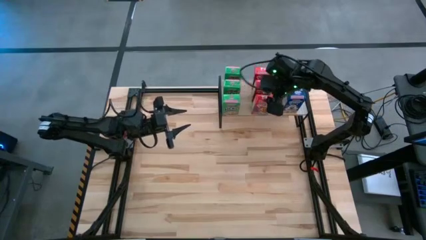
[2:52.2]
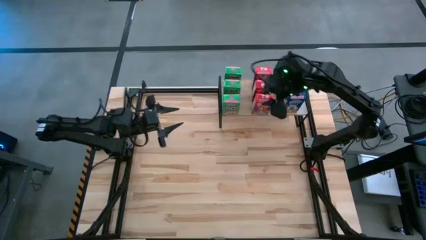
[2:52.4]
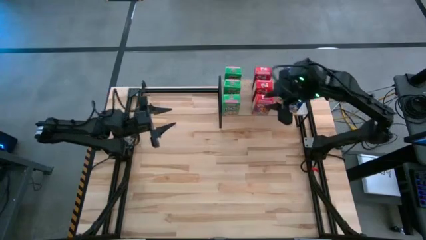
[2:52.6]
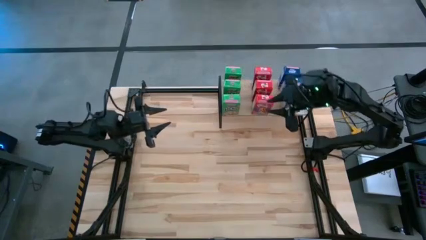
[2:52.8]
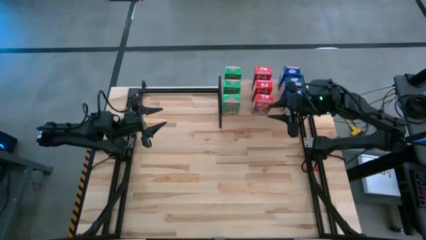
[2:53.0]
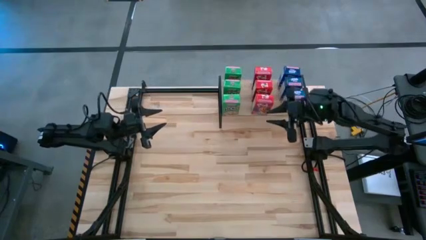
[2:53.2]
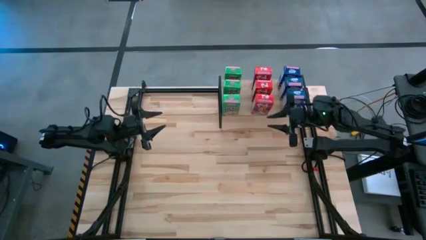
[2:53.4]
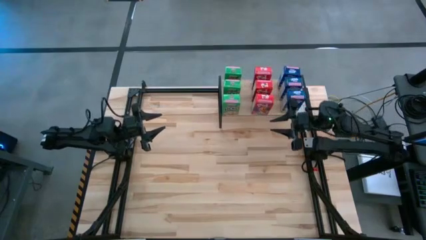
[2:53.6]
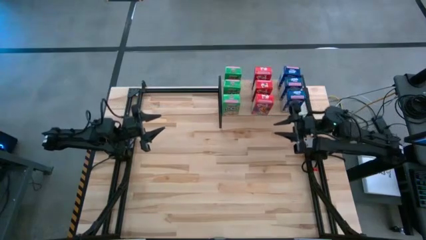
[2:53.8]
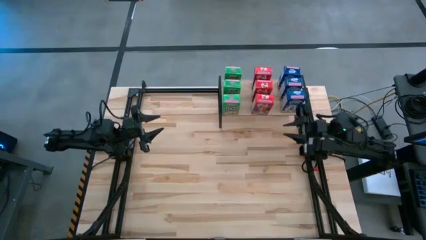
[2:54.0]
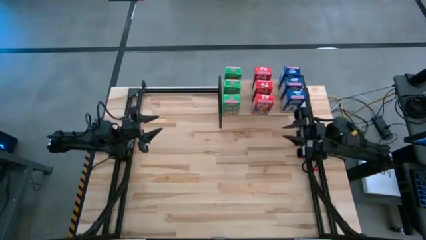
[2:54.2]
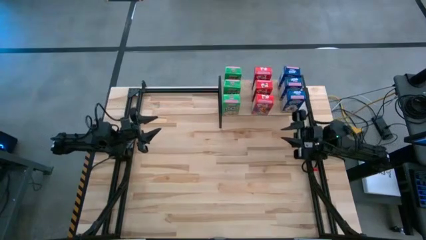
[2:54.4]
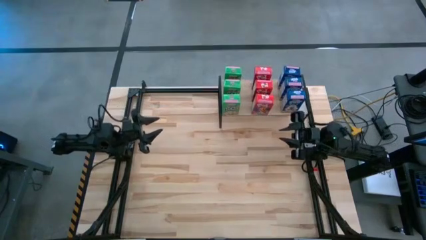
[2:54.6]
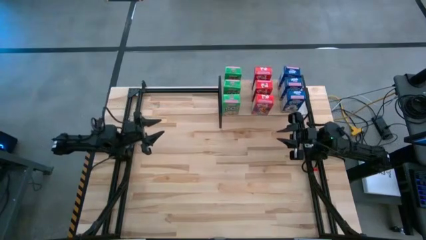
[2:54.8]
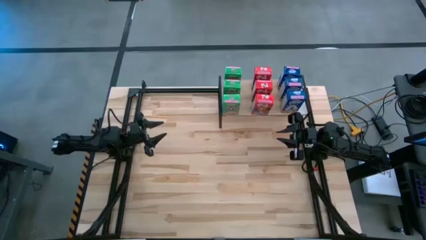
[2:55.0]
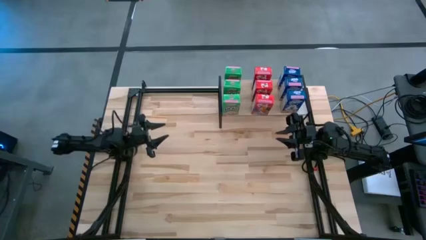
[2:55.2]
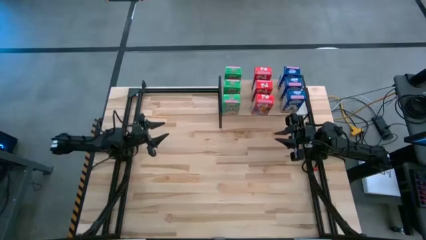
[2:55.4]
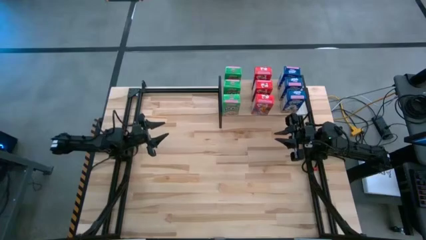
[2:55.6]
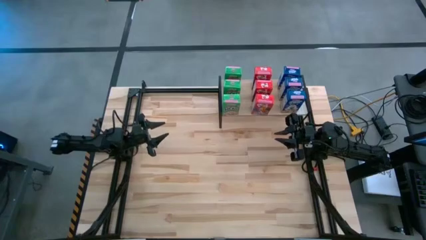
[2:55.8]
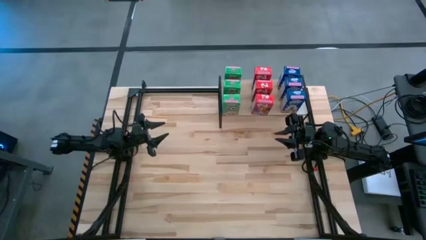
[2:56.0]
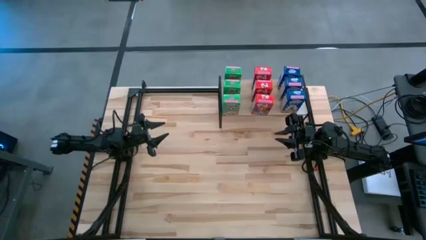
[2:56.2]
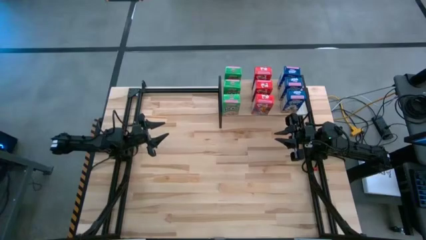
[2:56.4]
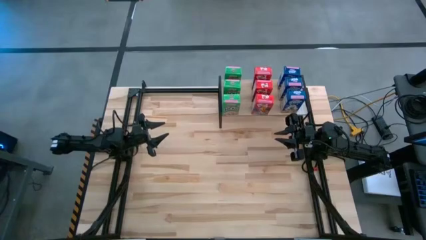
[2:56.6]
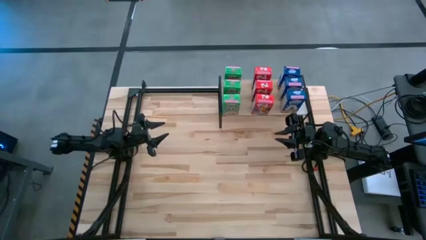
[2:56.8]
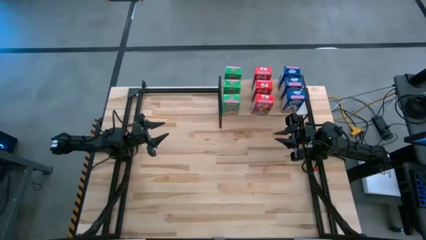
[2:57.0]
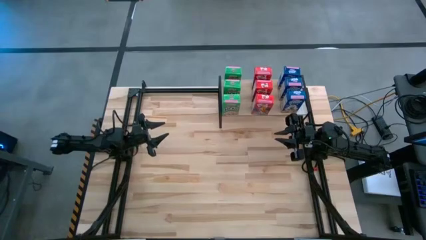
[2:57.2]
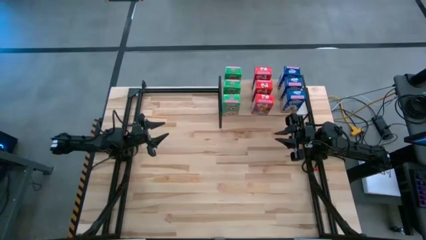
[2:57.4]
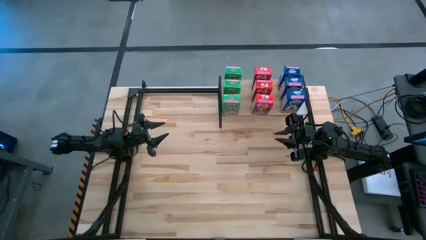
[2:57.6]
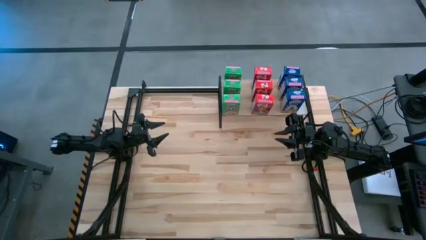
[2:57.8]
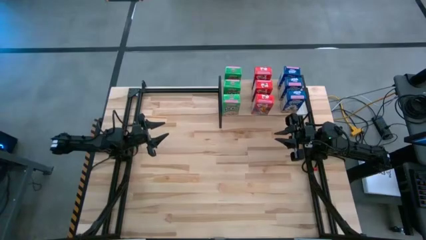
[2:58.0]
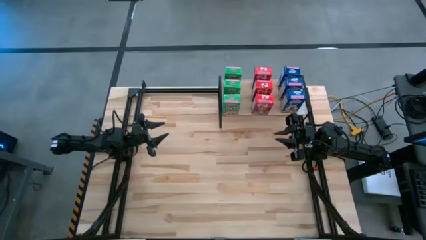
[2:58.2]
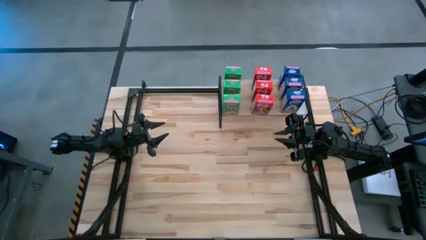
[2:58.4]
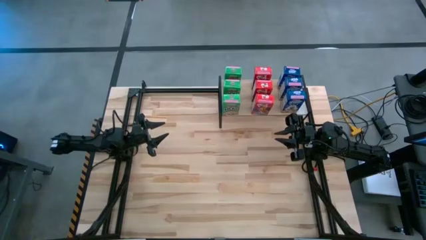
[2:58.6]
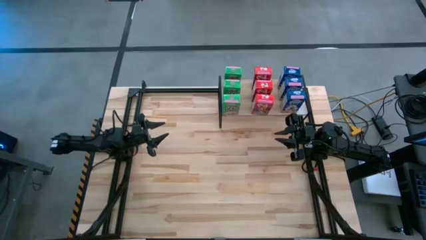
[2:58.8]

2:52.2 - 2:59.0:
Task: Stack cereal on shelf
Return to Home Position

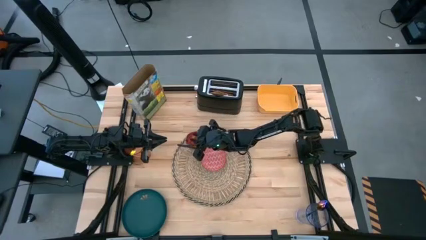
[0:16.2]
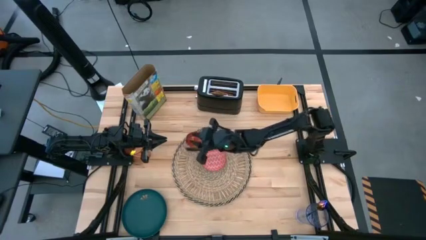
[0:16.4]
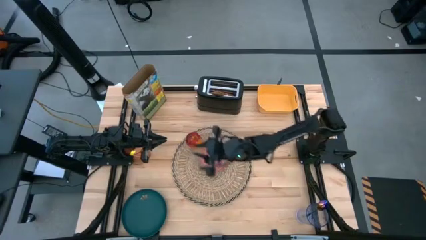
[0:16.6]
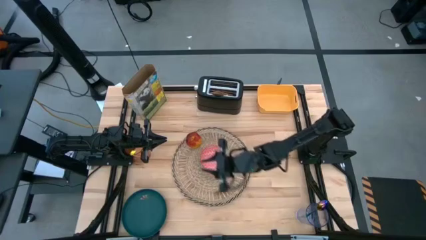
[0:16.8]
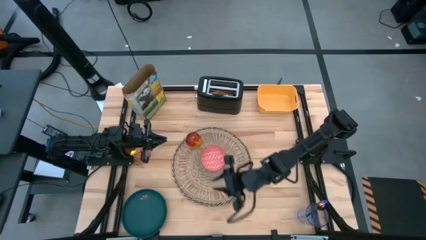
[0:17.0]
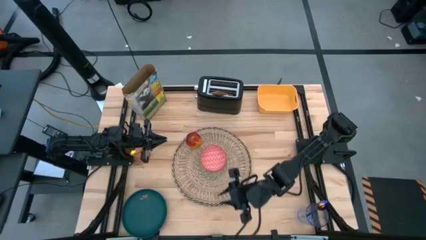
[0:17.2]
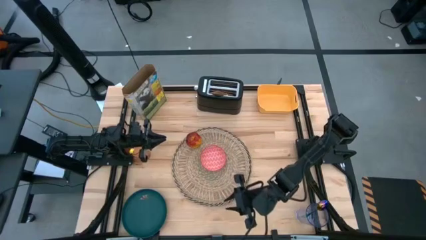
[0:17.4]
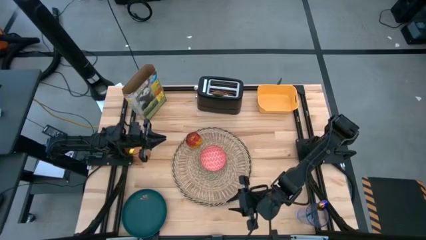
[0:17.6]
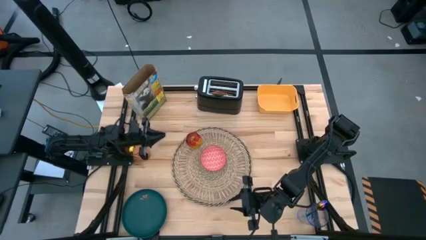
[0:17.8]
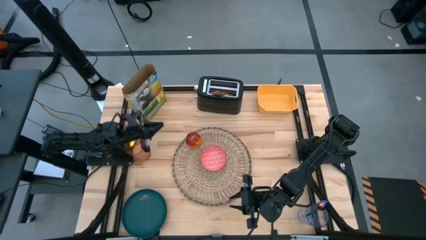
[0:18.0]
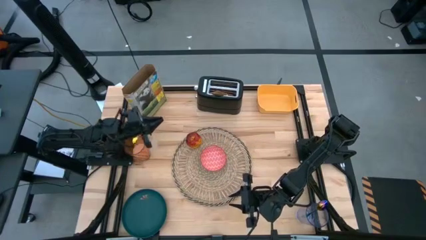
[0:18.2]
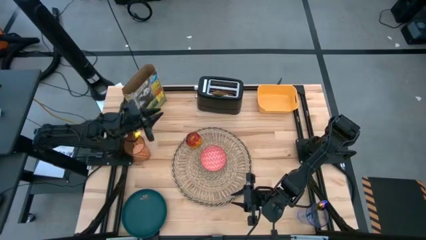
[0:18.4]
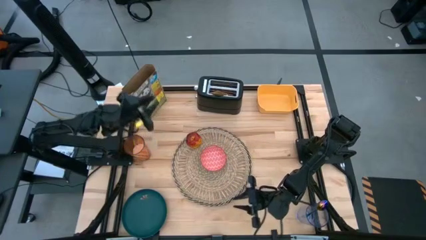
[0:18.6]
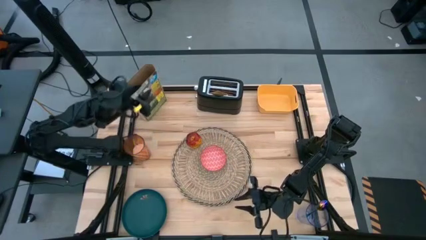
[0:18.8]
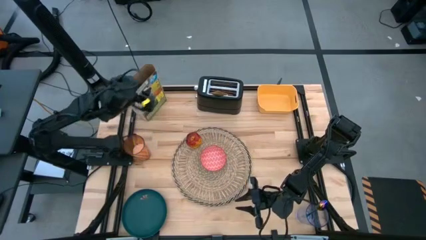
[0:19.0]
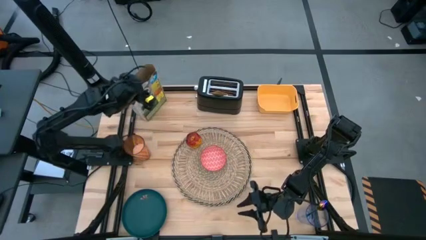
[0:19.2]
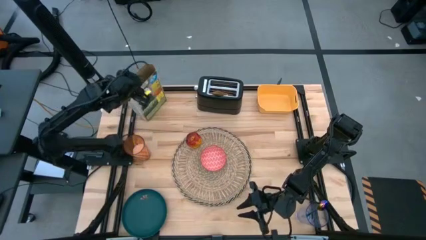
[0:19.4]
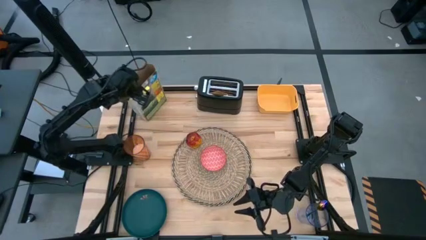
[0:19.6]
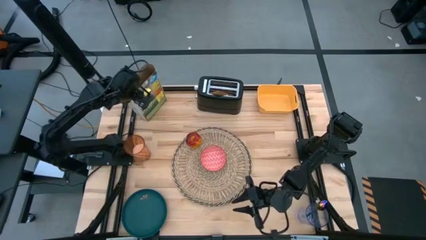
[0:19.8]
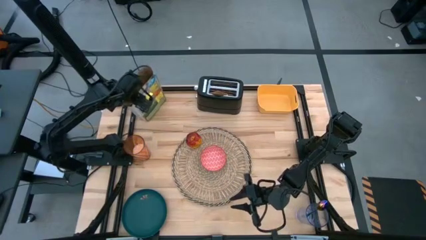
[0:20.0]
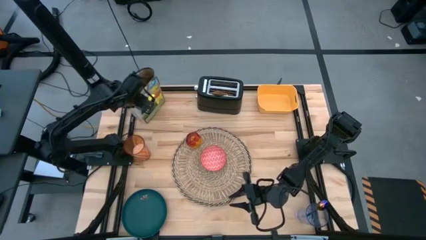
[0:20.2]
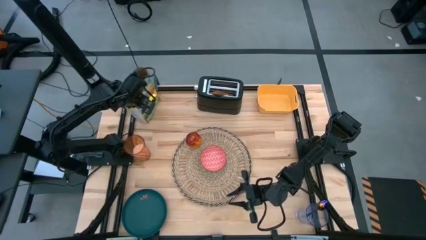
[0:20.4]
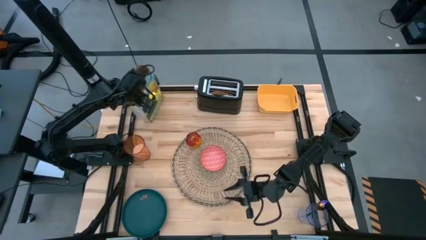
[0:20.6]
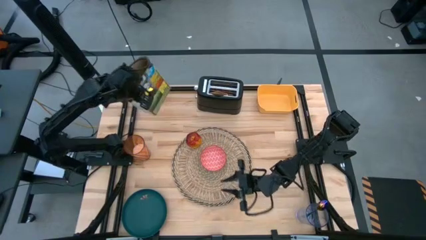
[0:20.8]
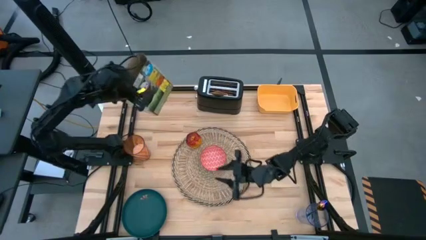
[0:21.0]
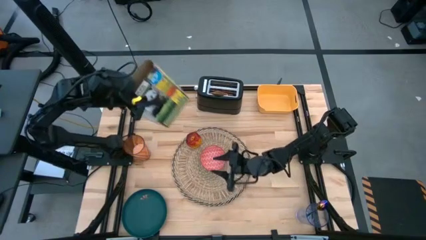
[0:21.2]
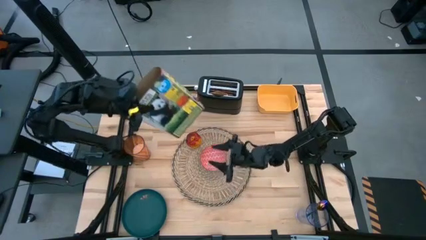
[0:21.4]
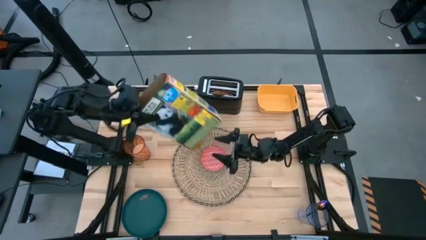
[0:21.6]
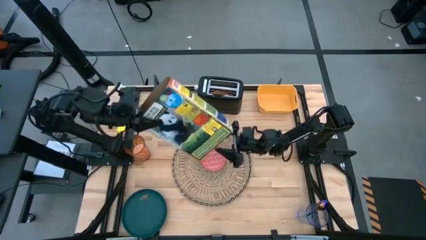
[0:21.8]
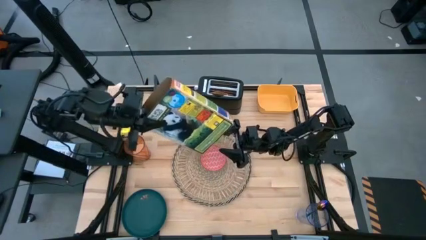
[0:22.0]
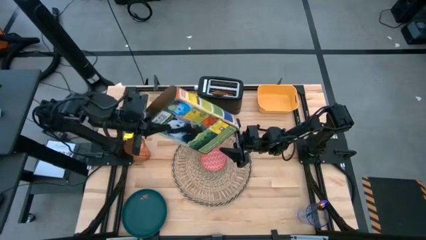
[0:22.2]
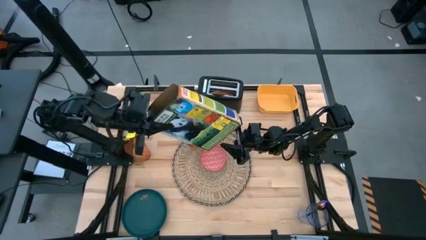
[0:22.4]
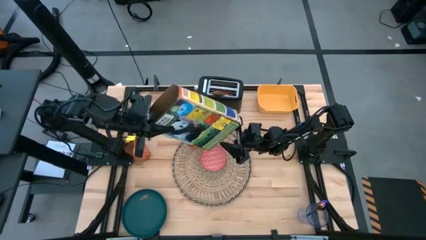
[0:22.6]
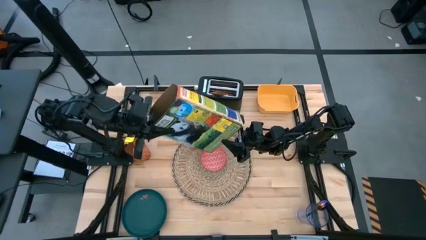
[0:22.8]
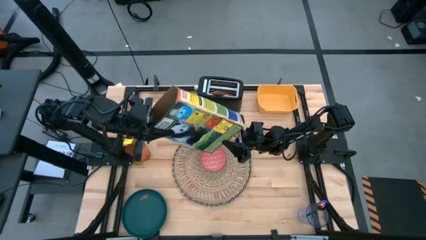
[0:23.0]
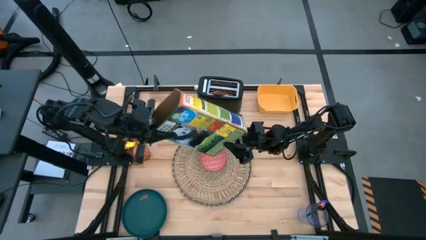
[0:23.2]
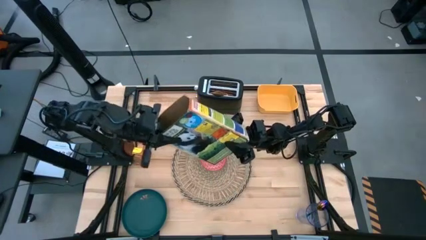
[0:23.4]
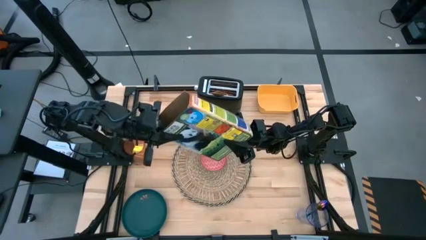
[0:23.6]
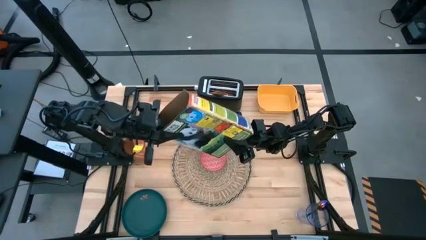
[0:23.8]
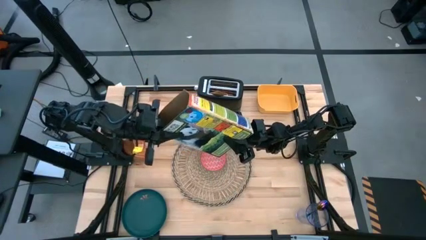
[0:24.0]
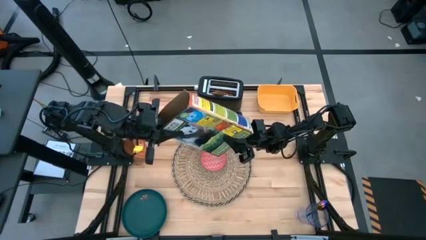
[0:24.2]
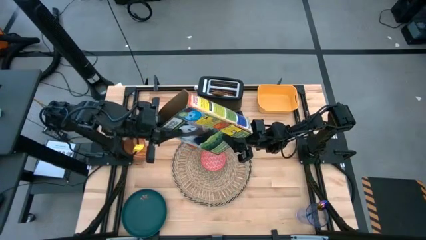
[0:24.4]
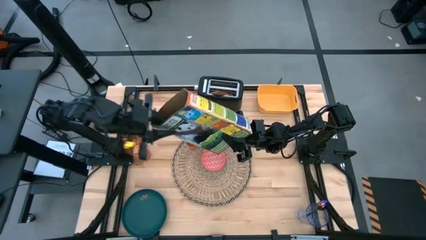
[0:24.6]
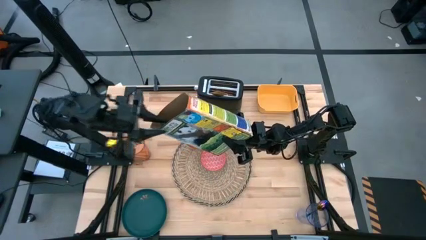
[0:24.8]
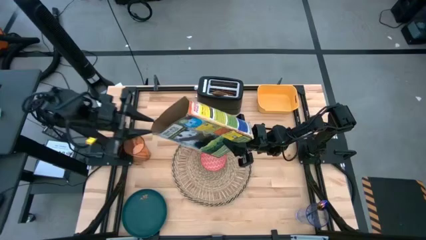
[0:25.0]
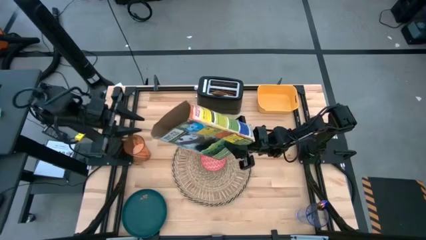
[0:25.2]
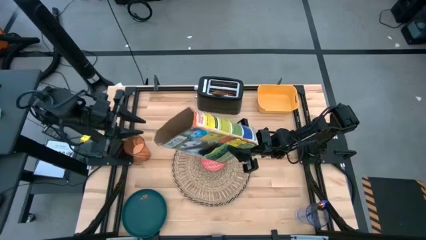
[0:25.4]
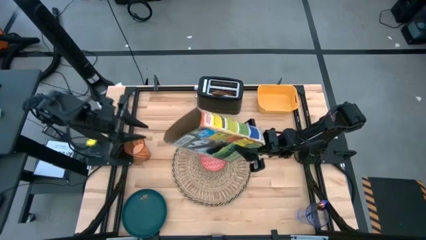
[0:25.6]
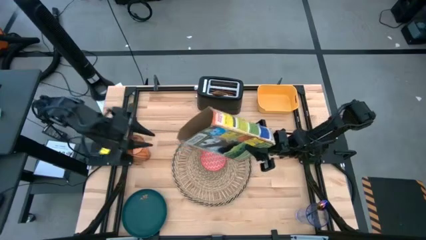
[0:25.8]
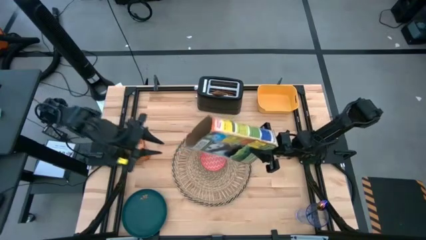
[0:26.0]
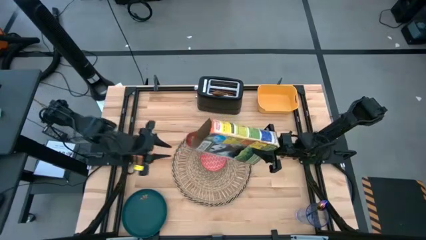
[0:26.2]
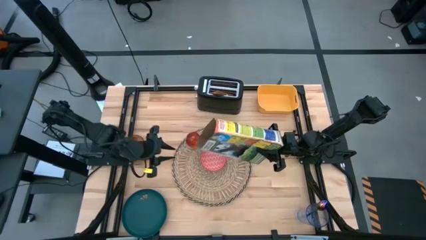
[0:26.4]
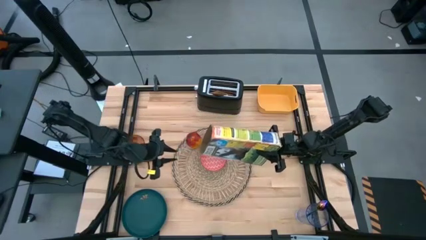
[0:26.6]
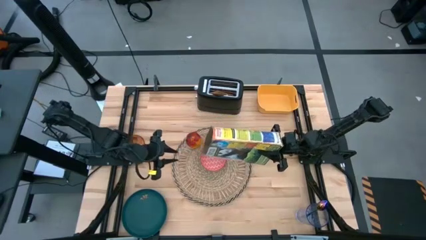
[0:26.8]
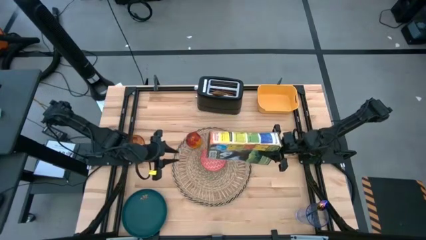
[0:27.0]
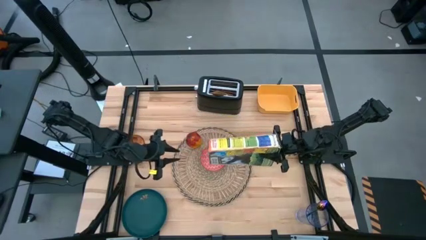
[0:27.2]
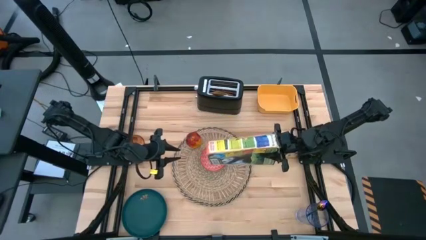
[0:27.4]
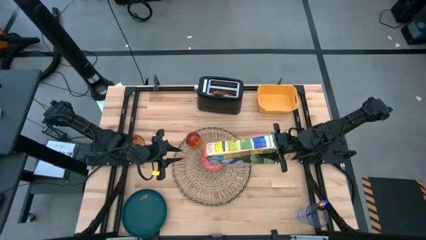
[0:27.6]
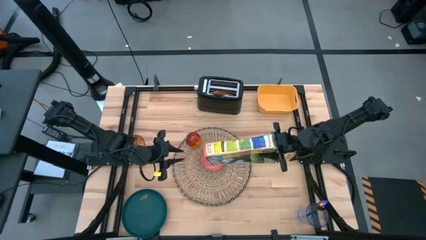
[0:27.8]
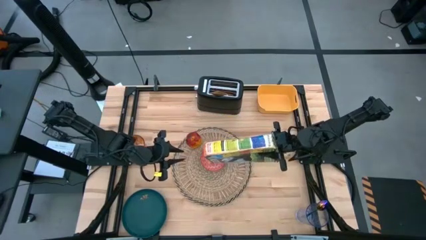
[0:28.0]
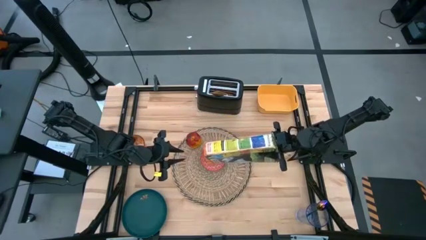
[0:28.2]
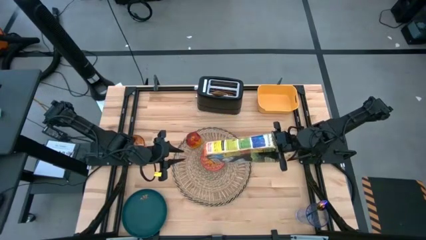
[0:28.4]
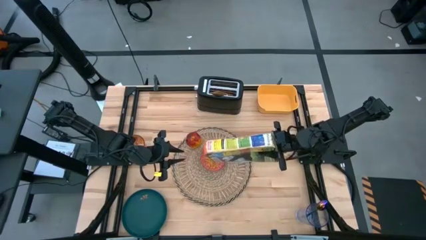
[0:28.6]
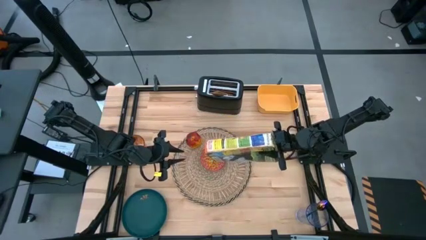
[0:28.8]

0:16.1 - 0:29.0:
Task: Arrange a breakfast setting
Pour the cereal into the red patterned bowl
